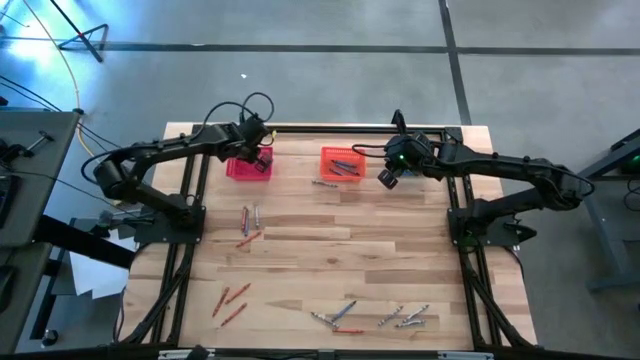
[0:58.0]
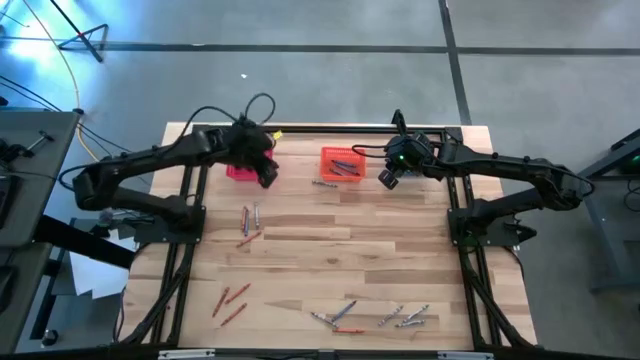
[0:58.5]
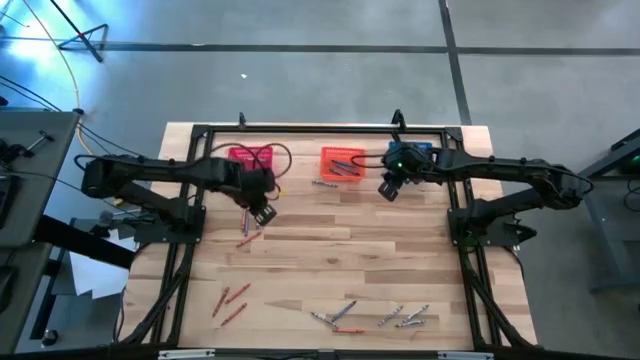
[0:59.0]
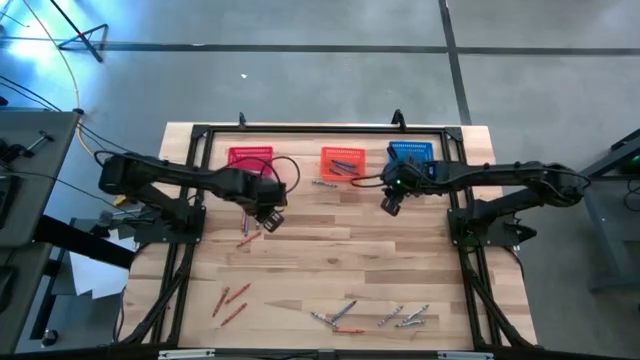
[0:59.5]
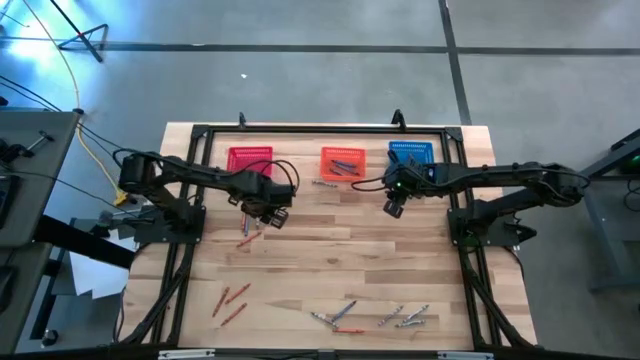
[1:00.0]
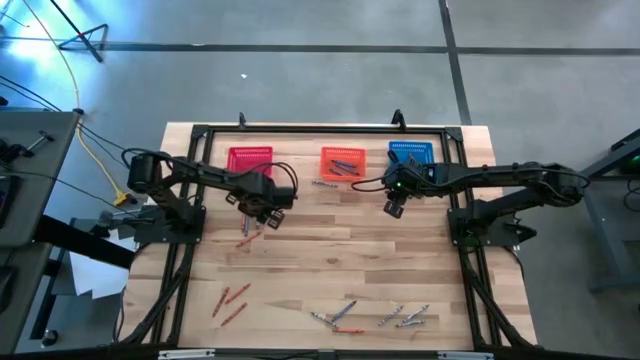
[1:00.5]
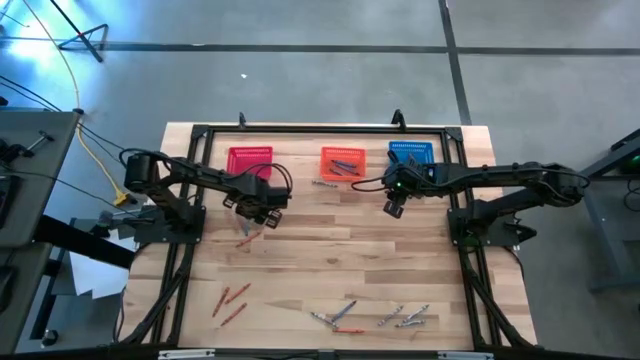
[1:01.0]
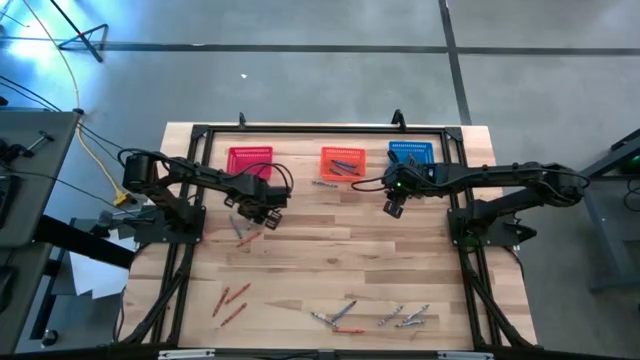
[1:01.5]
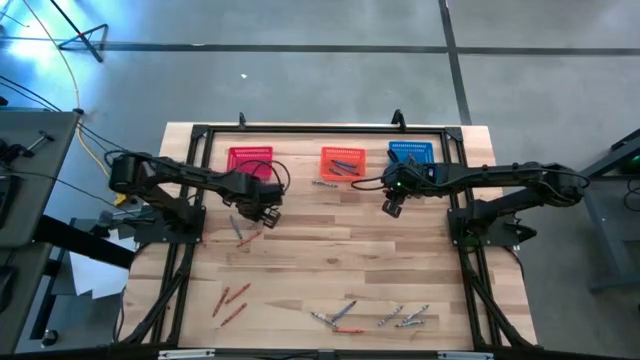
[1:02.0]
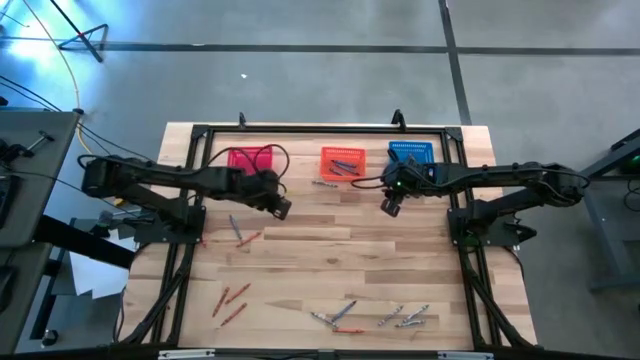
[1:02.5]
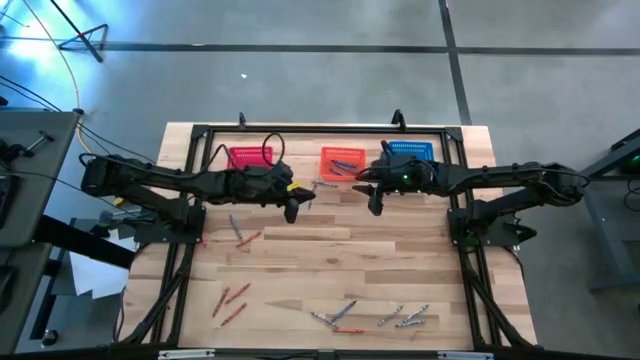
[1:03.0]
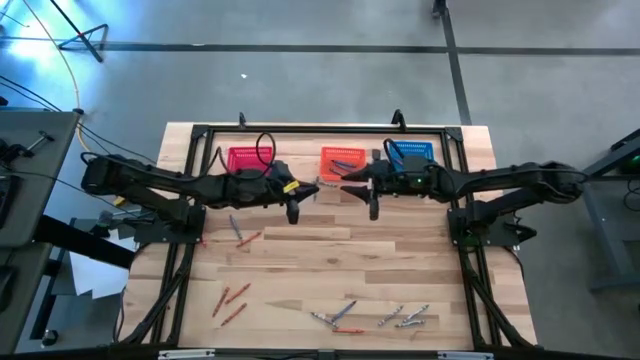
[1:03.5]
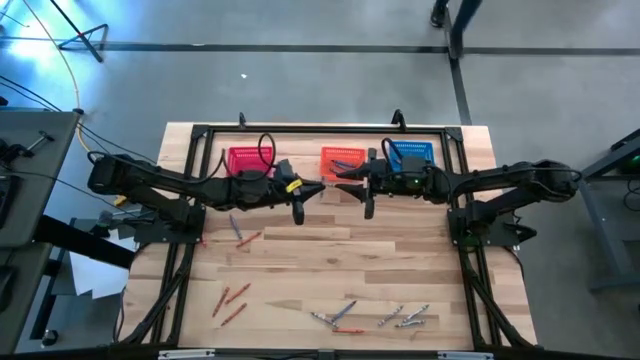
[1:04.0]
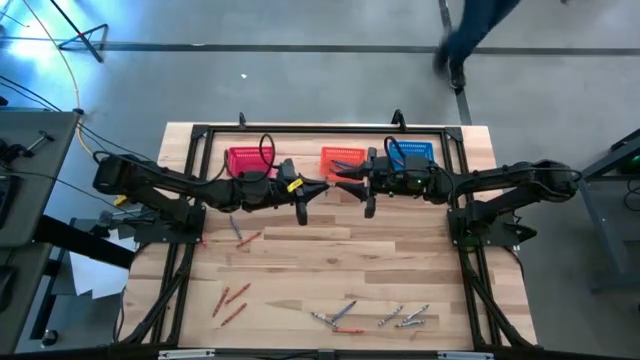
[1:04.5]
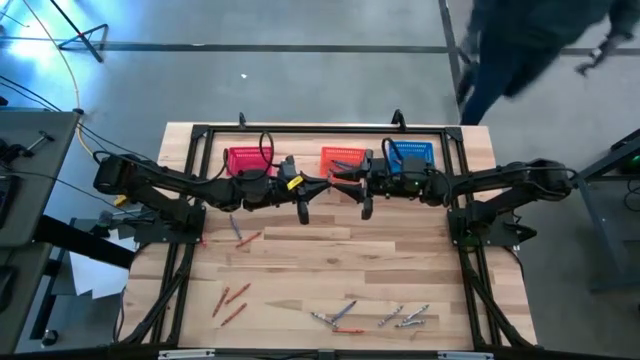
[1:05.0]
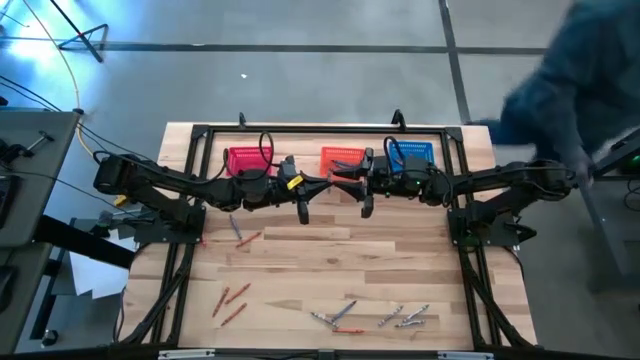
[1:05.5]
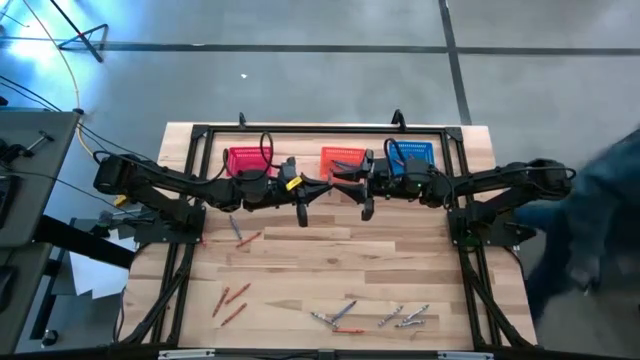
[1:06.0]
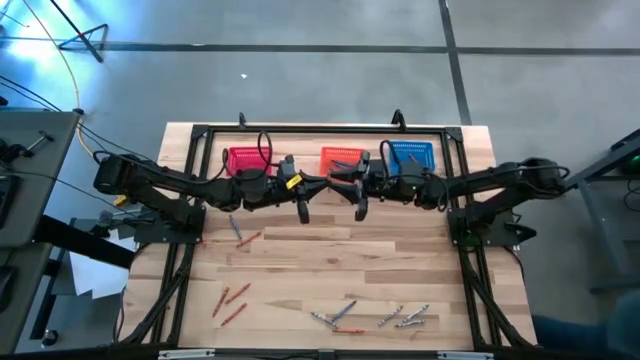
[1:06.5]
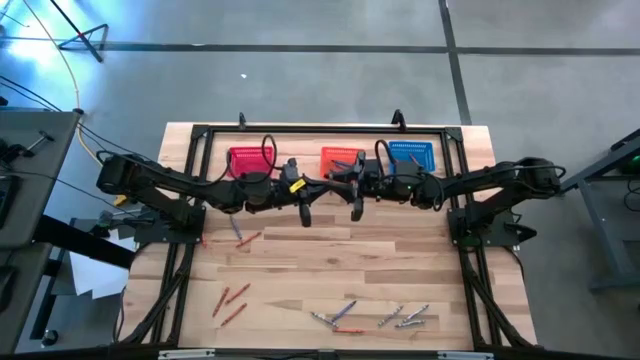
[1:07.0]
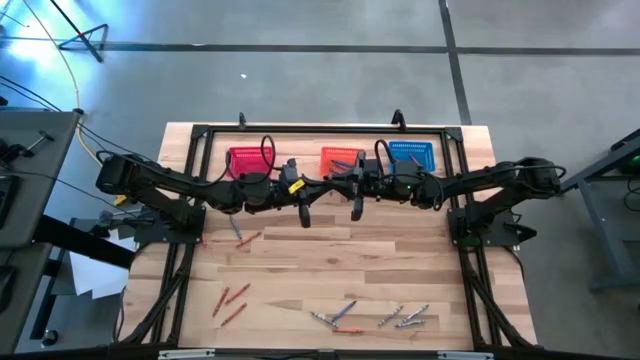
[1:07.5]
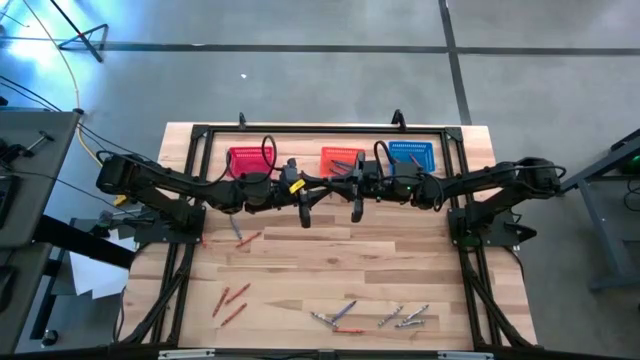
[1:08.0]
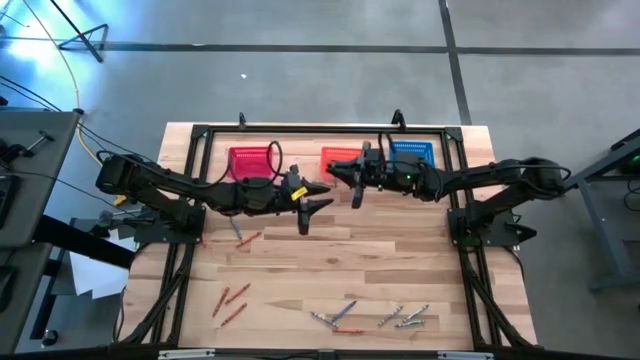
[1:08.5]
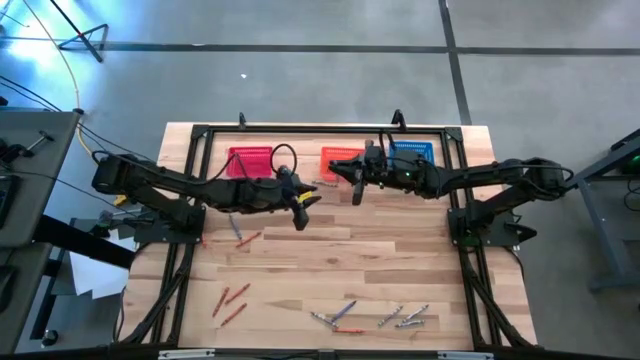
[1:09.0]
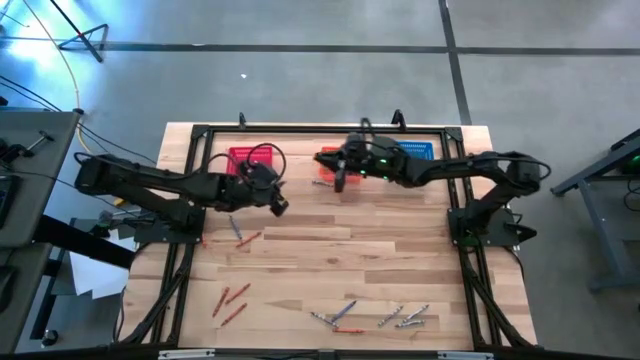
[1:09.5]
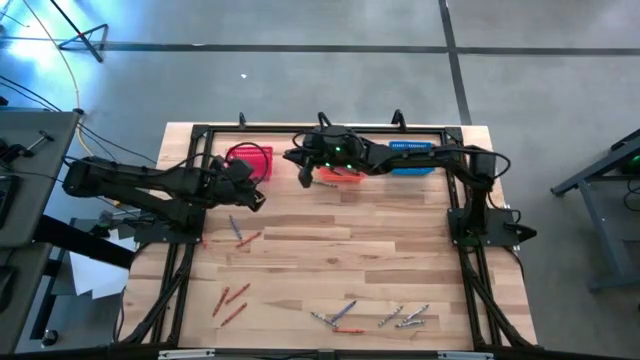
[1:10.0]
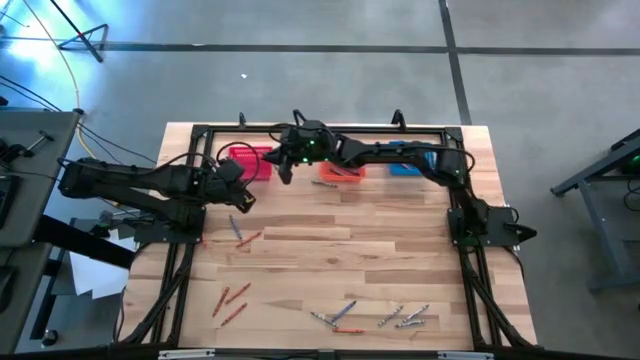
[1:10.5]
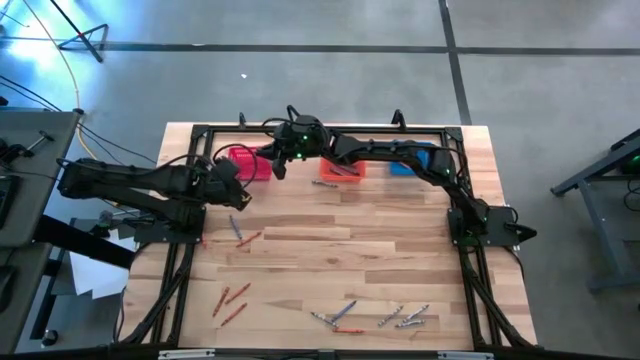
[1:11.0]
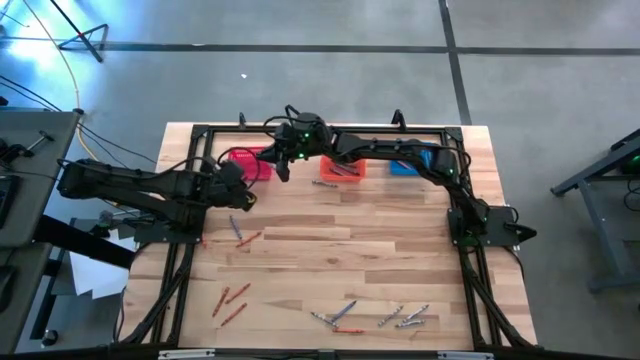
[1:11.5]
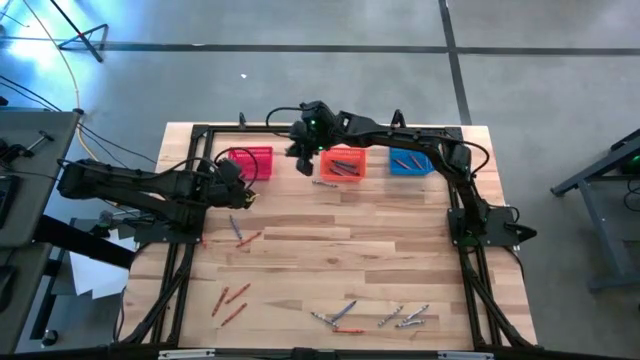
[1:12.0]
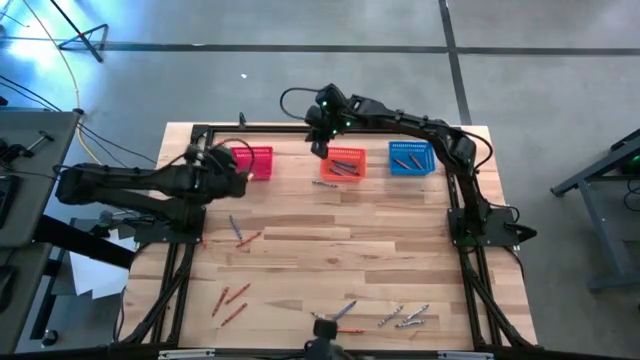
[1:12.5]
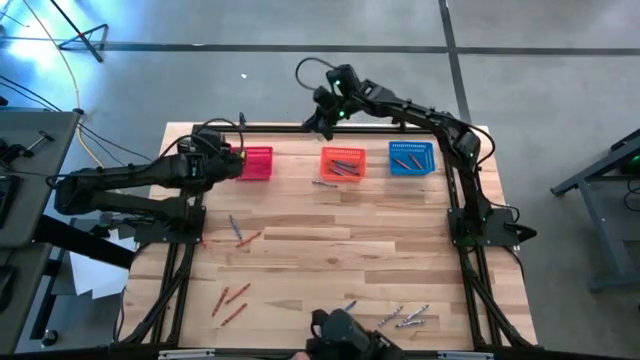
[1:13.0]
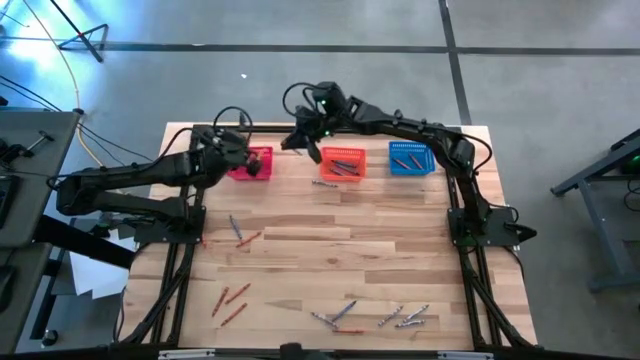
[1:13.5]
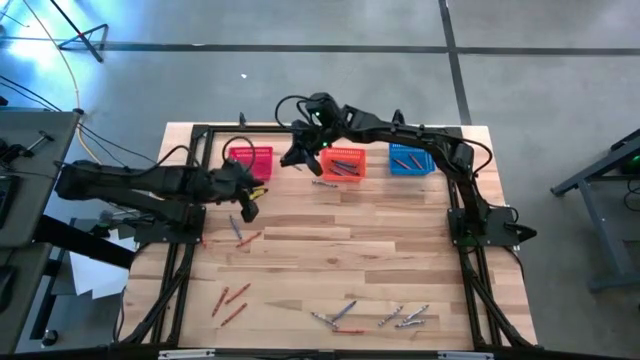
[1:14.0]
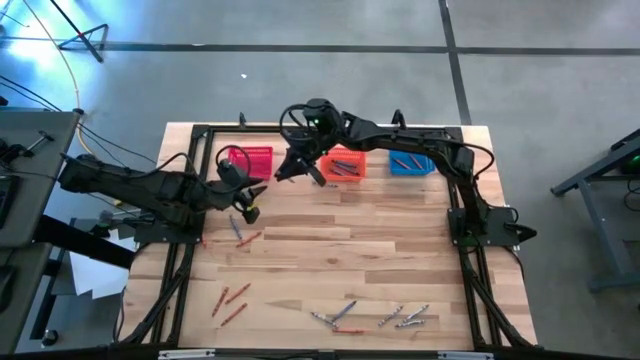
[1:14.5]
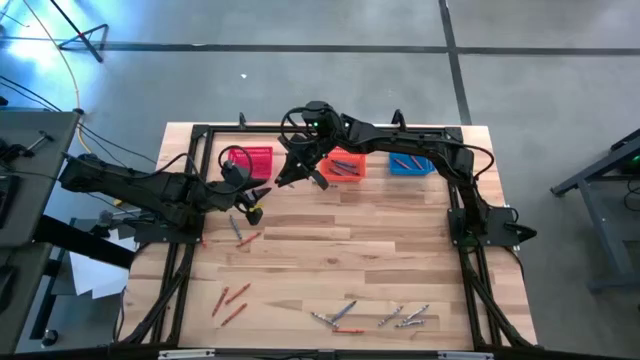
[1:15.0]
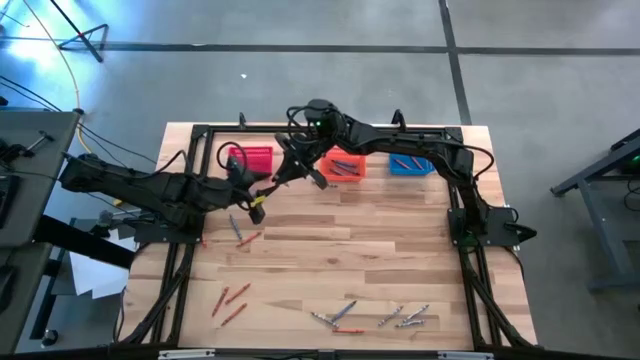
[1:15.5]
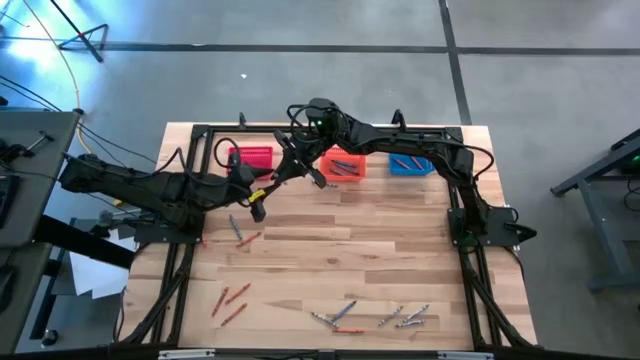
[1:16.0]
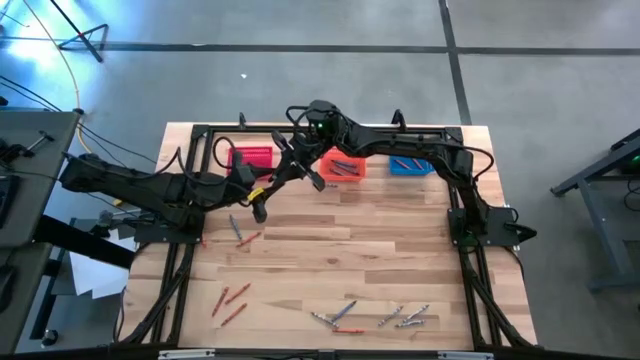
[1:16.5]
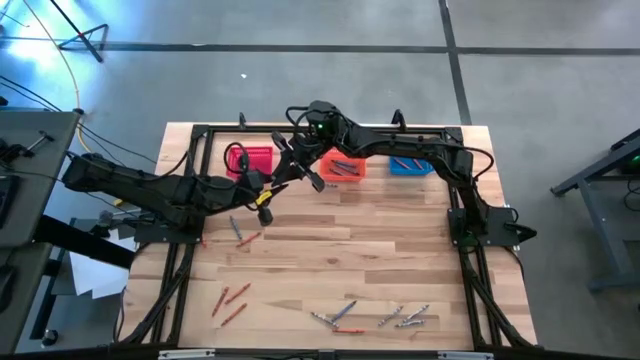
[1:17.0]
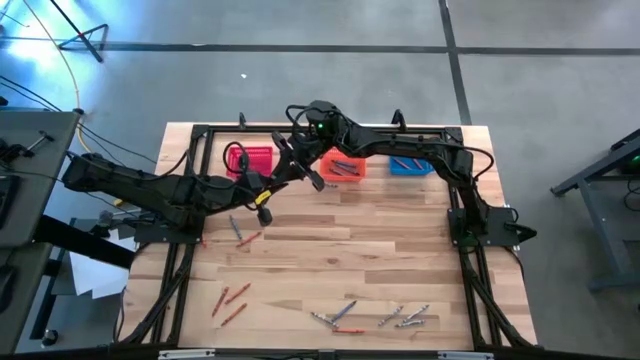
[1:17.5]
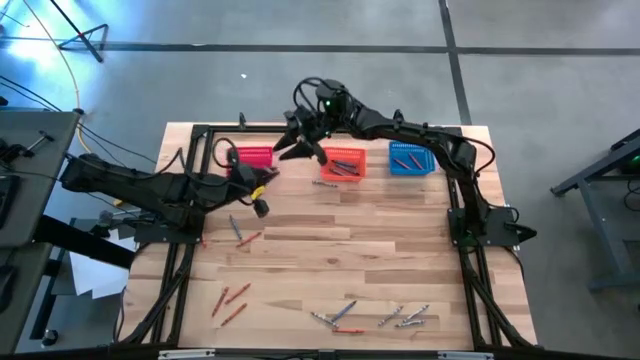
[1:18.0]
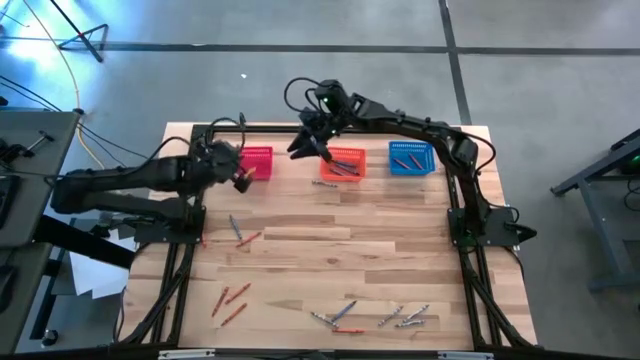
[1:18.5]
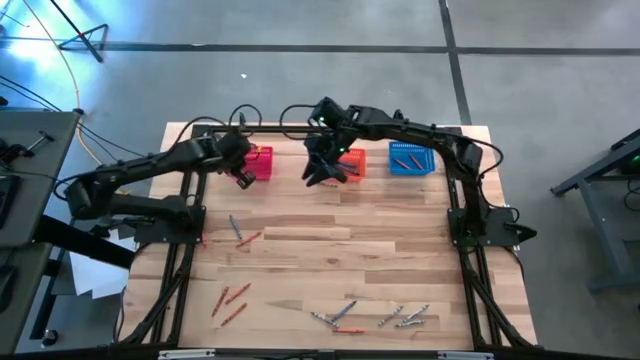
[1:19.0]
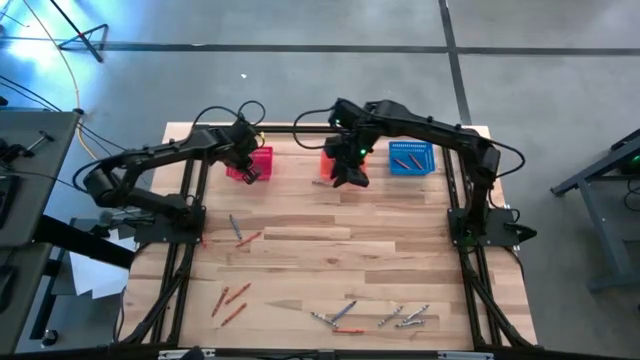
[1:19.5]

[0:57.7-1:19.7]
Task: Sort crayons
Put the gray crayon into the red bin
